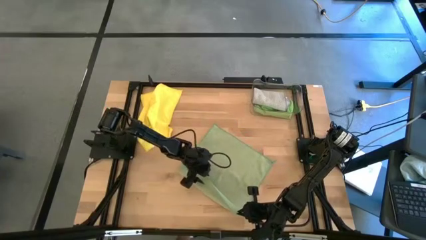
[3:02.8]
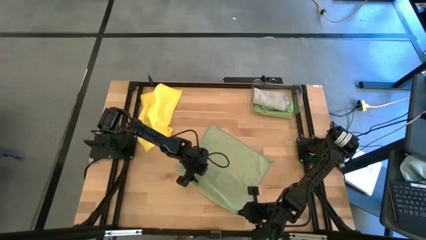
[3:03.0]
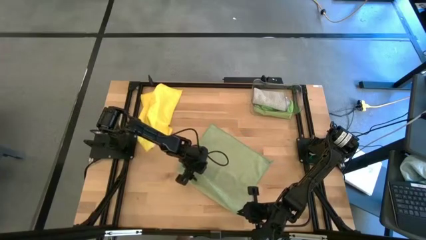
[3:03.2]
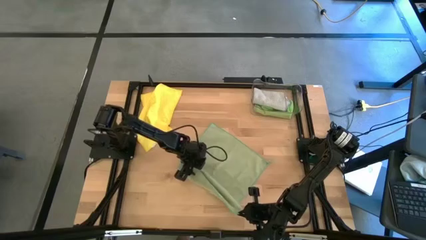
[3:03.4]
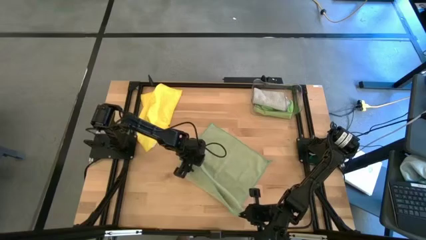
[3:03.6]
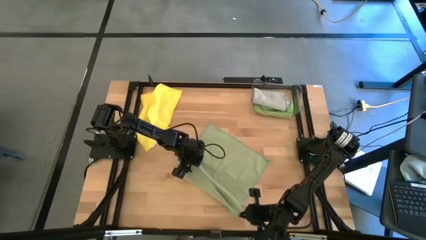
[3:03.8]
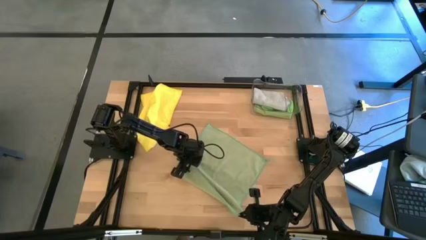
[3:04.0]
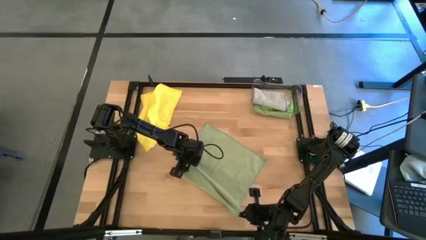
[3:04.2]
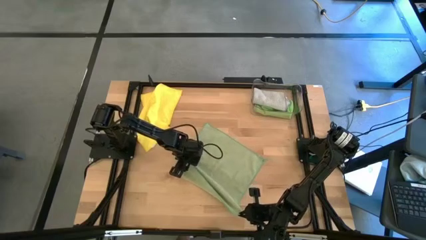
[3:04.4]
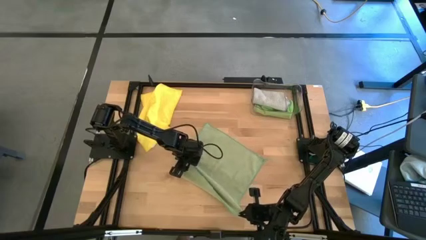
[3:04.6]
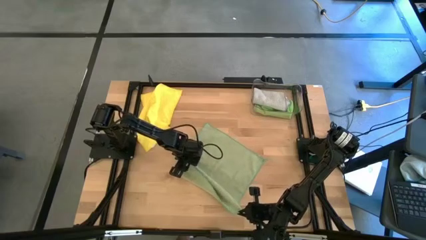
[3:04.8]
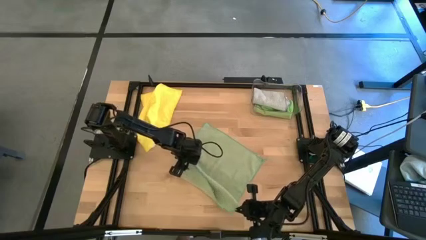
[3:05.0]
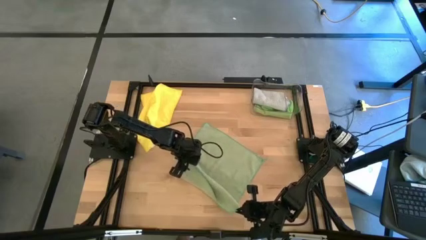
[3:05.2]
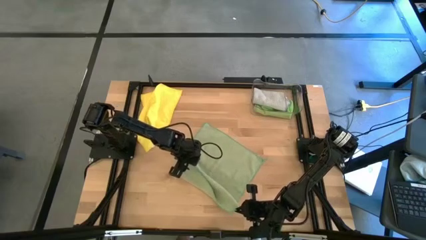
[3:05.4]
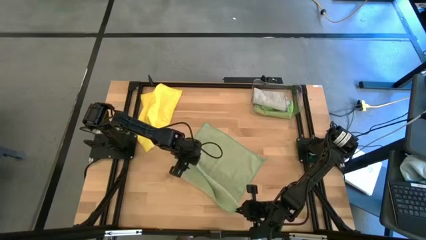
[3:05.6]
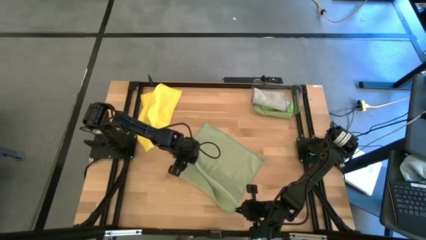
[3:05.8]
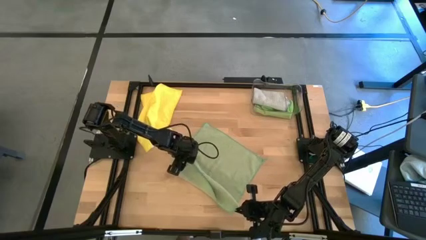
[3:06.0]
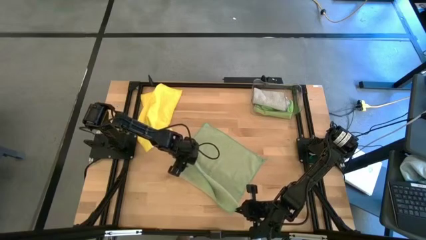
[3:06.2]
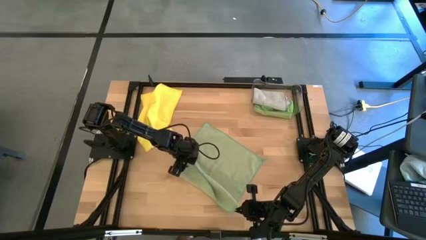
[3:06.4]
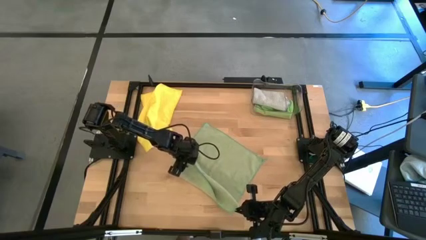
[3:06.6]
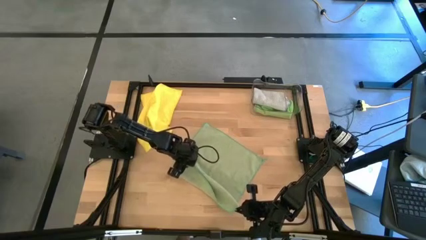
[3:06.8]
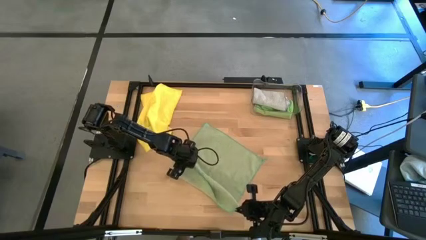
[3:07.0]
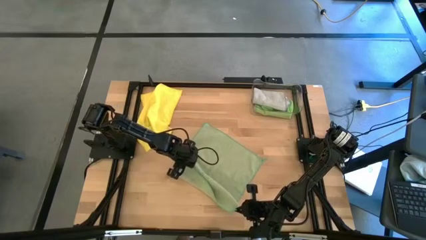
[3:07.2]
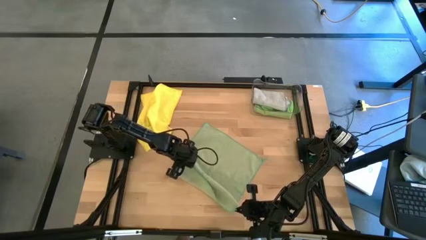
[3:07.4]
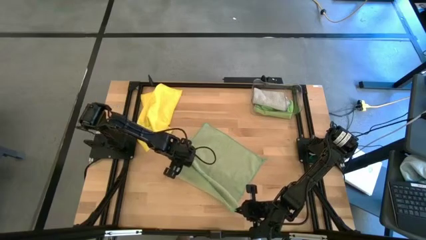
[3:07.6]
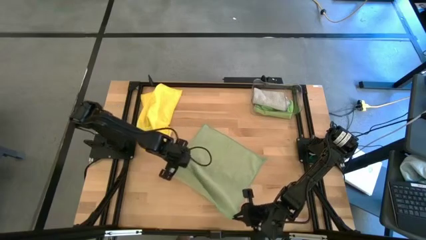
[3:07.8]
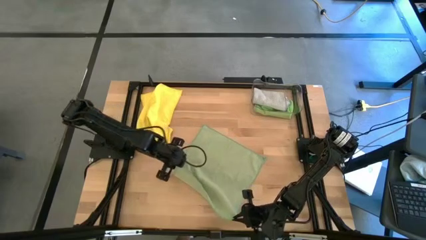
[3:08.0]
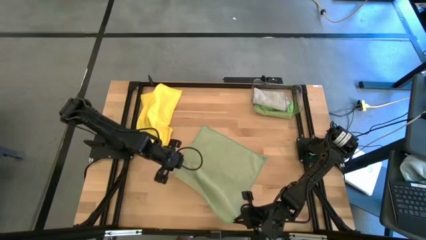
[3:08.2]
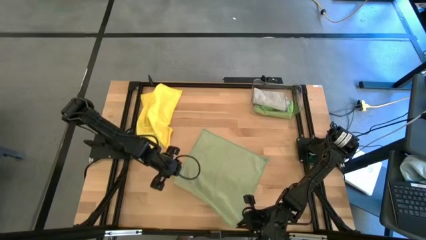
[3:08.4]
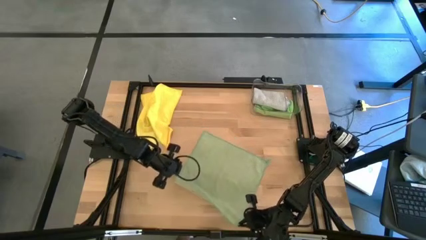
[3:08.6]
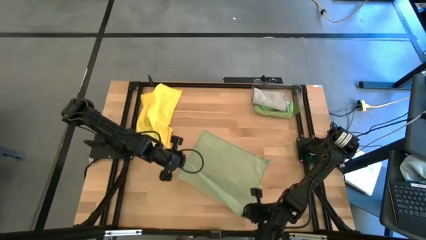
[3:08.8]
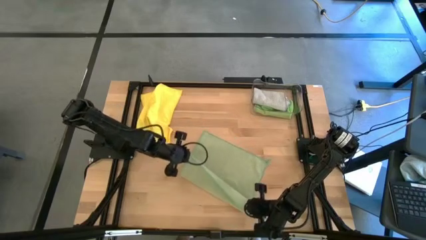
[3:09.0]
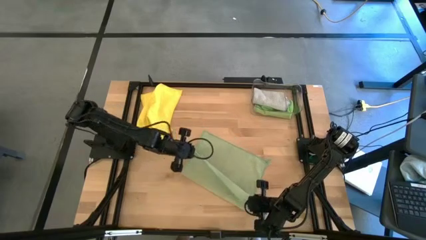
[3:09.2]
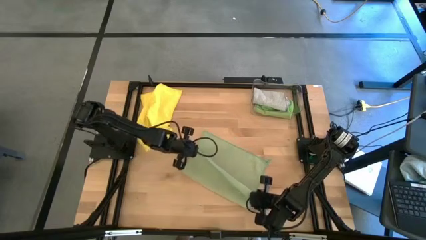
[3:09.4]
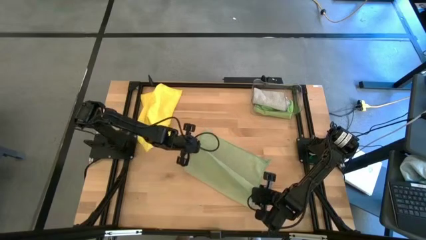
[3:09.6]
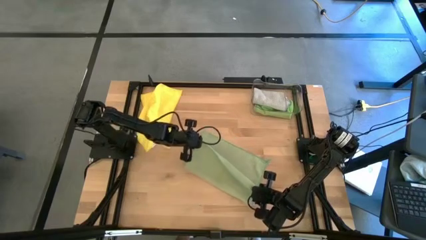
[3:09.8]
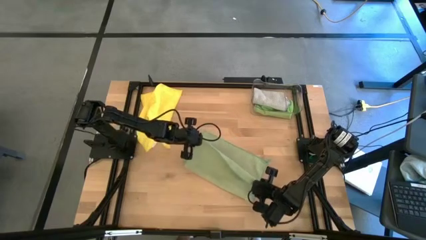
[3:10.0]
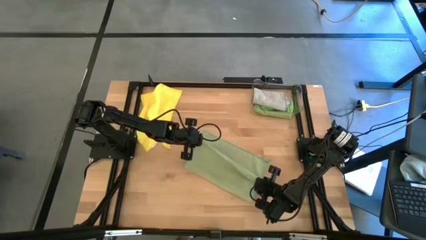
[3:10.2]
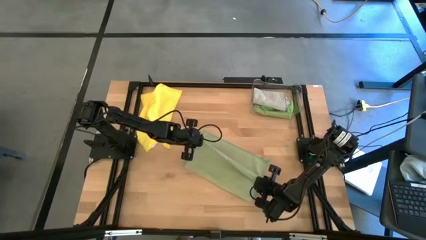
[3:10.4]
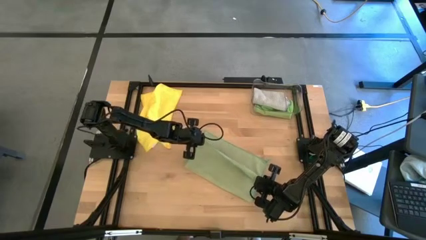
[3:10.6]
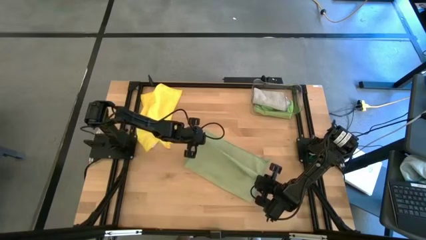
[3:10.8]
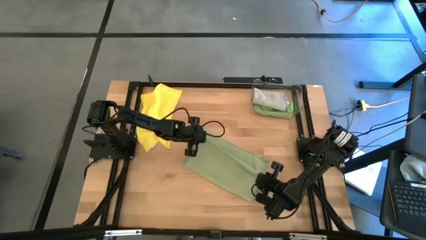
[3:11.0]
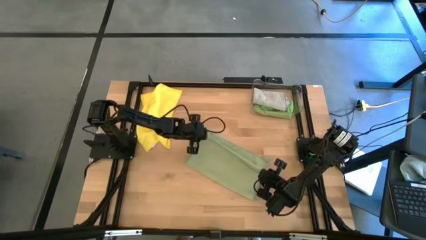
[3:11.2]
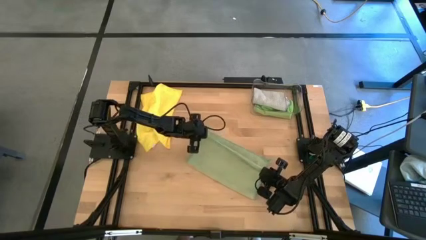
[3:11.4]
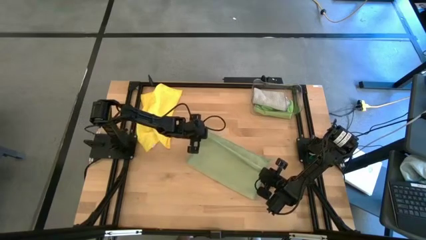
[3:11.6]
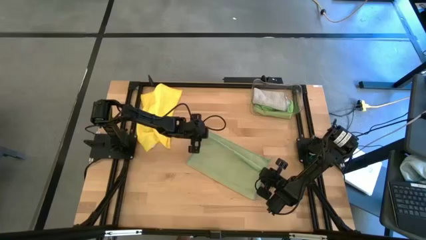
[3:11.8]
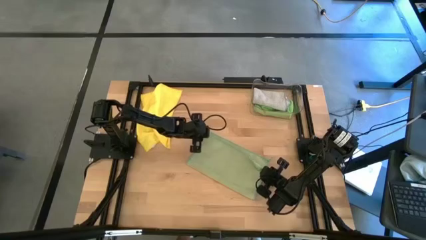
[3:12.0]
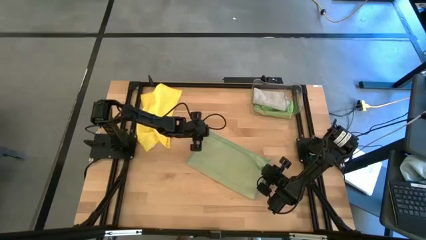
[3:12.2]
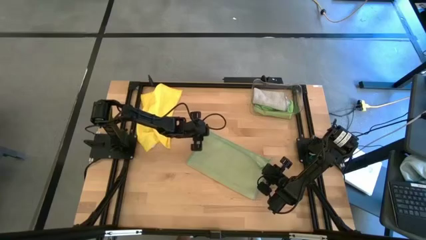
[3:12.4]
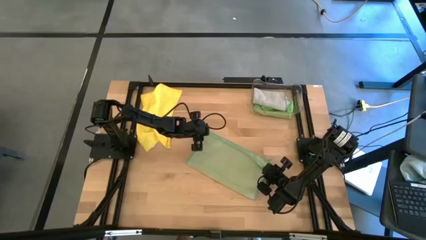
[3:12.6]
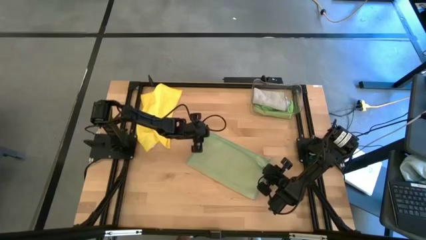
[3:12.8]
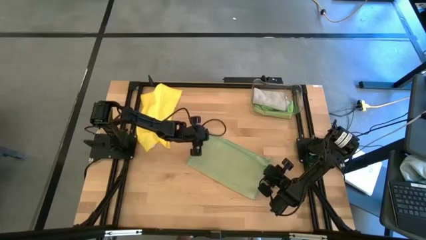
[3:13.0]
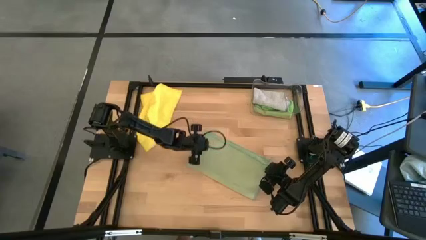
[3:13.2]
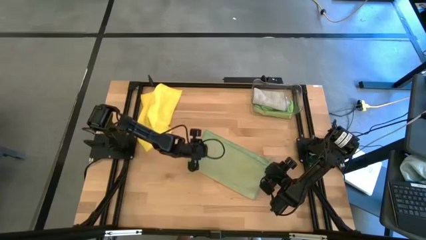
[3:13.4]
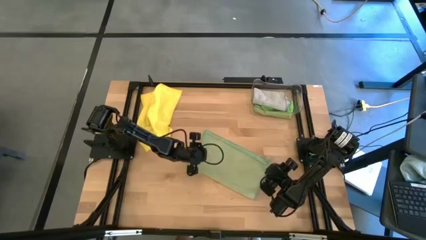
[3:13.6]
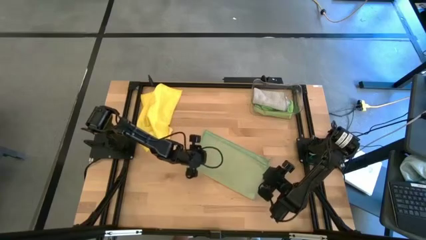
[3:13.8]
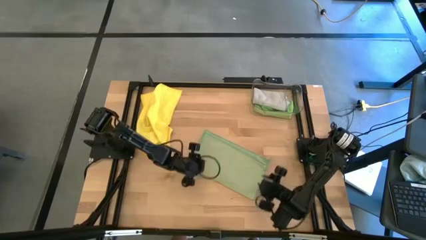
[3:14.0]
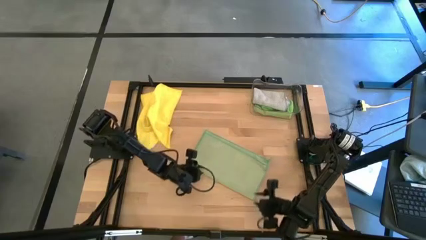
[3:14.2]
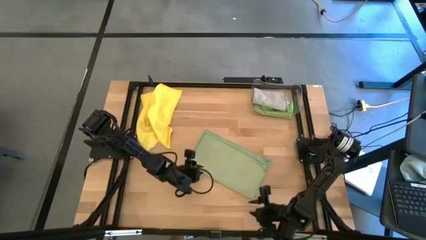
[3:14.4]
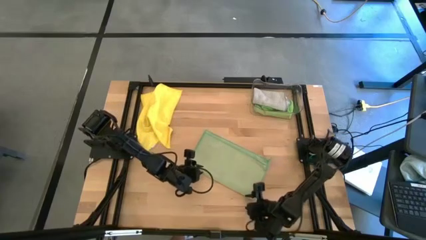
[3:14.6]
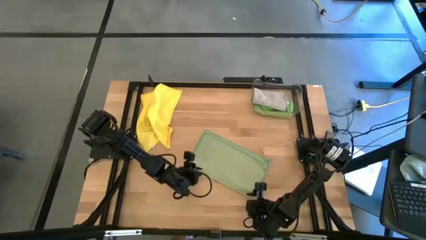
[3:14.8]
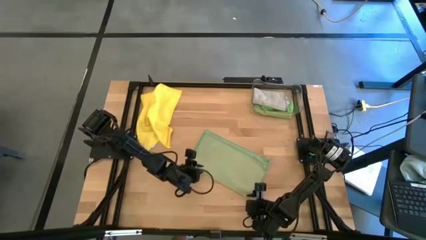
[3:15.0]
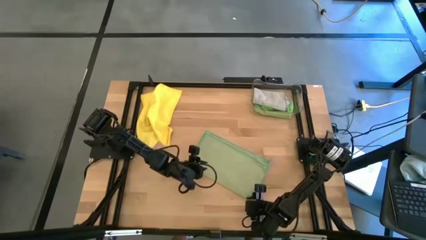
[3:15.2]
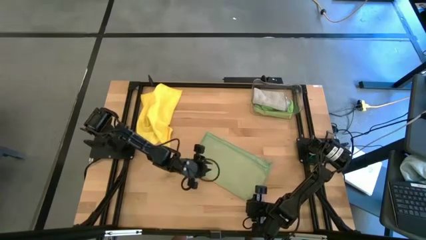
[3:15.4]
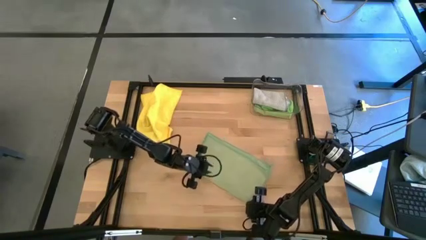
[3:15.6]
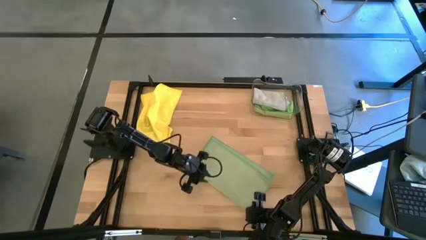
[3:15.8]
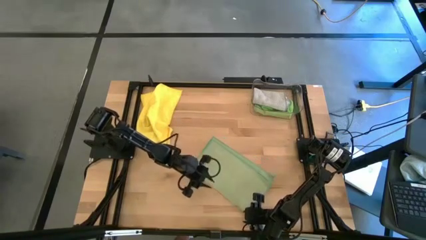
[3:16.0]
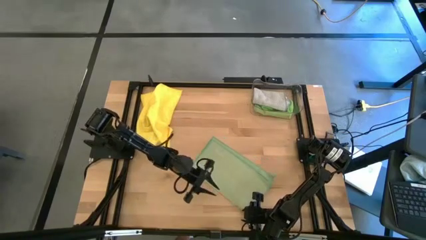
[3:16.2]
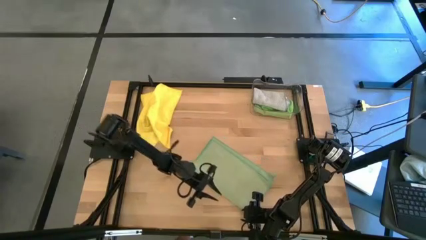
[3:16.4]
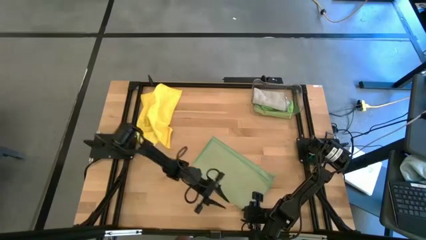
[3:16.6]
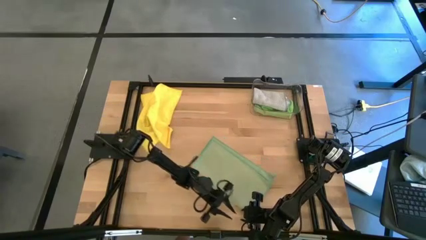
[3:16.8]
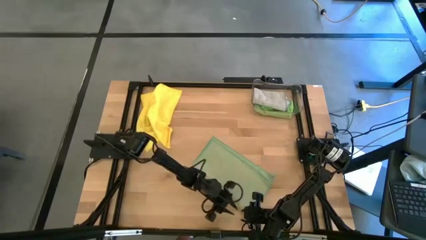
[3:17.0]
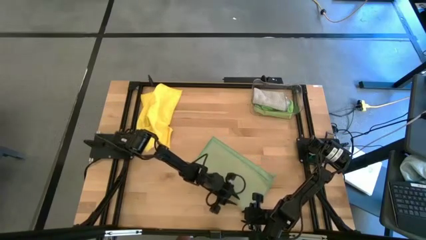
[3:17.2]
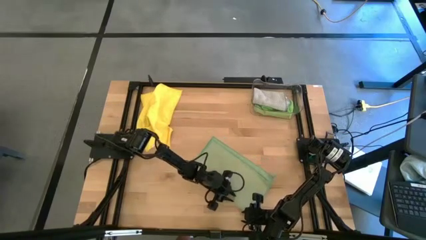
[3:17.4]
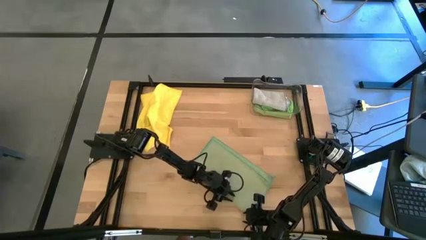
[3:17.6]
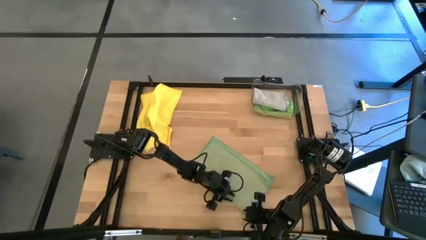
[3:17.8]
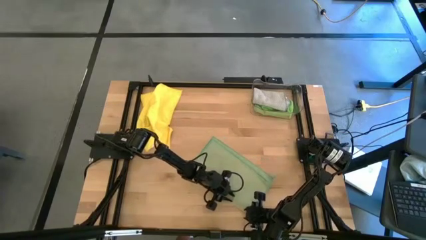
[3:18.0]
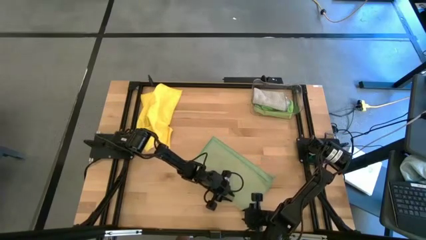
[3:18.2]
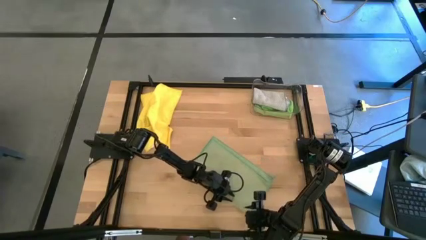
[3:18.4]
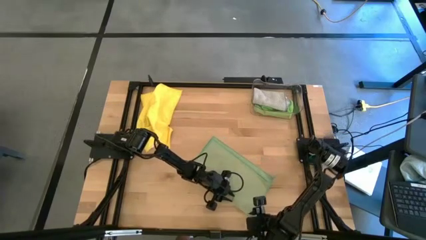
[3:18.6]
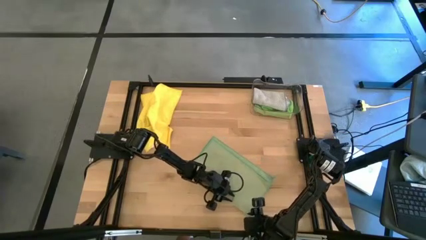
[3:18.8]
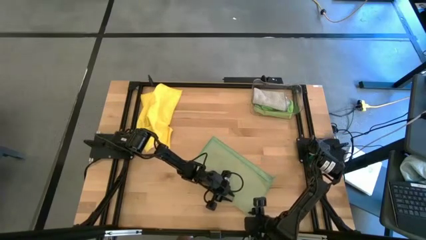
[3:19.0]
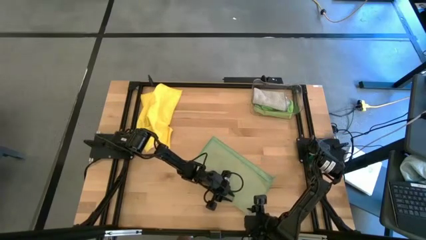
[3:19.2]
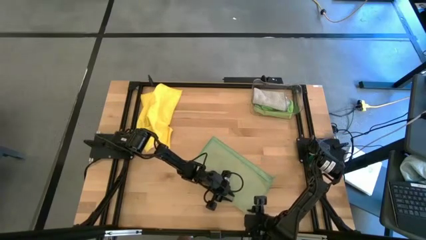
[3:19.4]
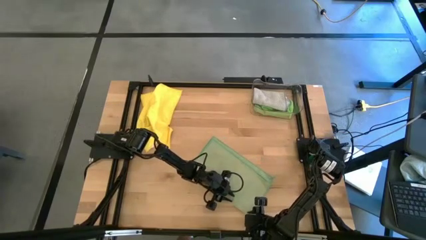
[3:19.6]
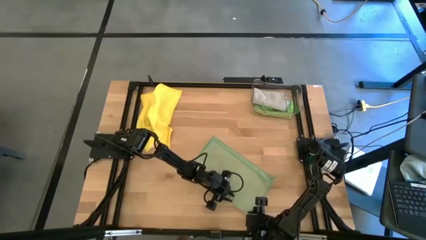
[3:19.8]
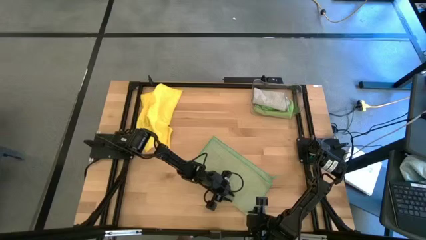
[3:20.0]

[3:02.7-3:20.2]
Task: Fold microfiber towels
Fold the light green cloth
